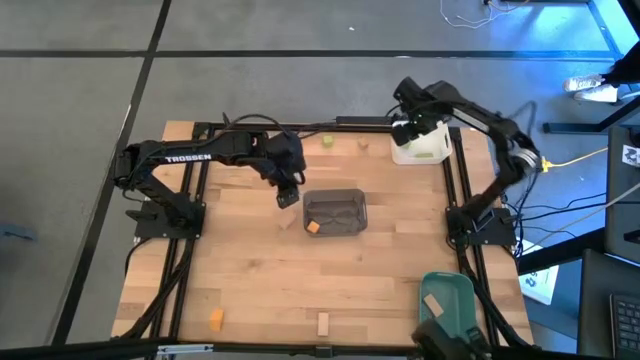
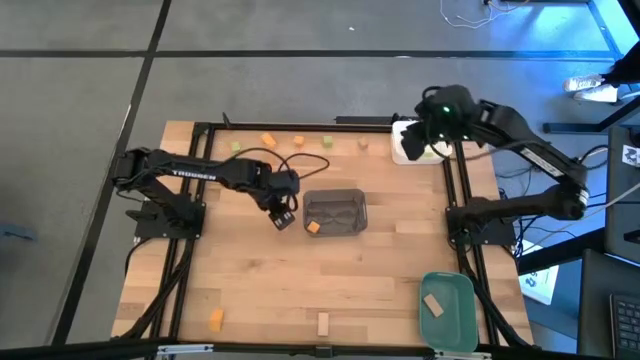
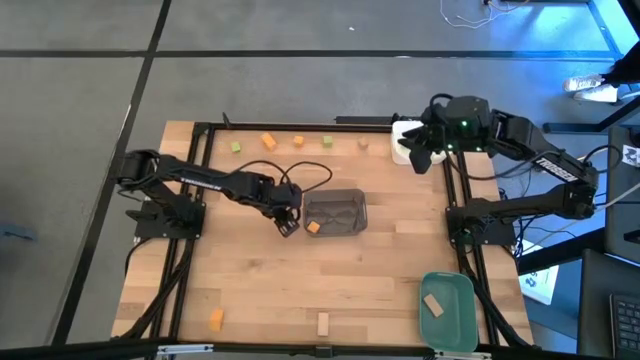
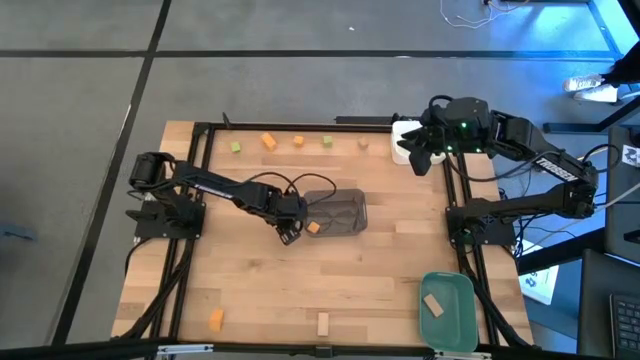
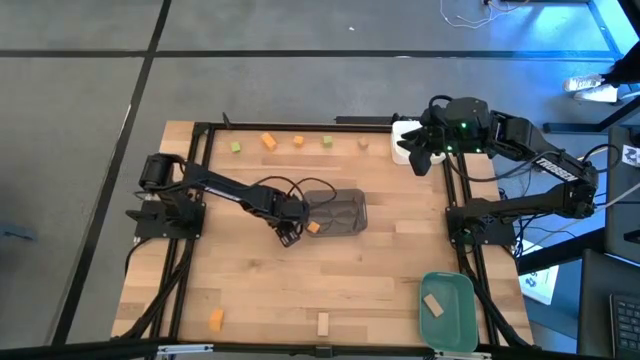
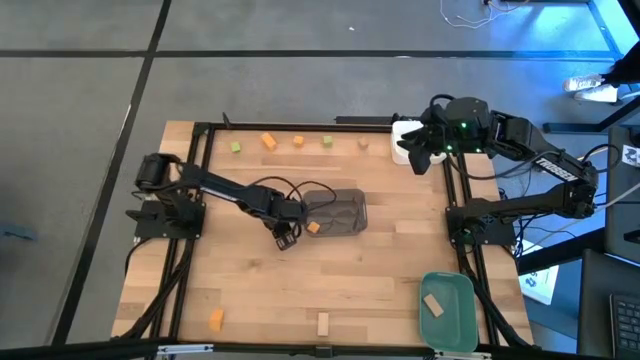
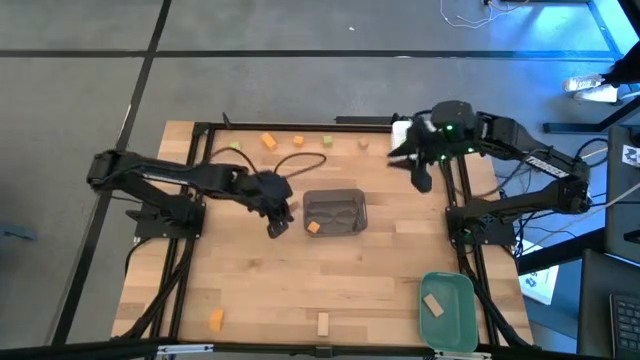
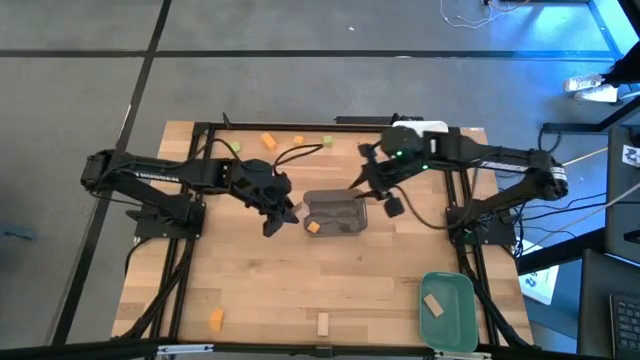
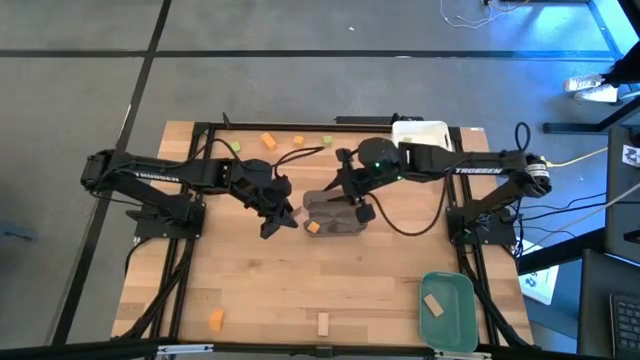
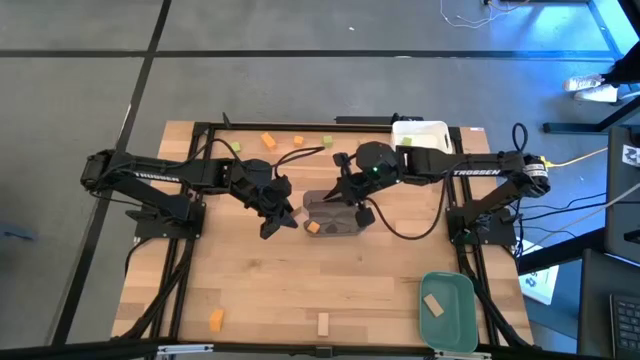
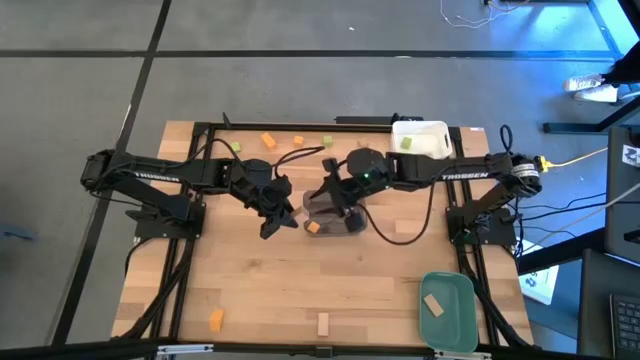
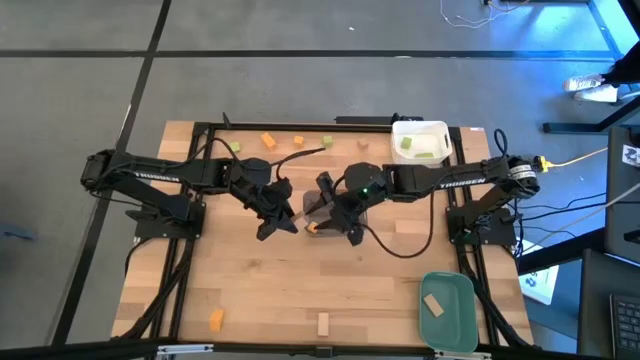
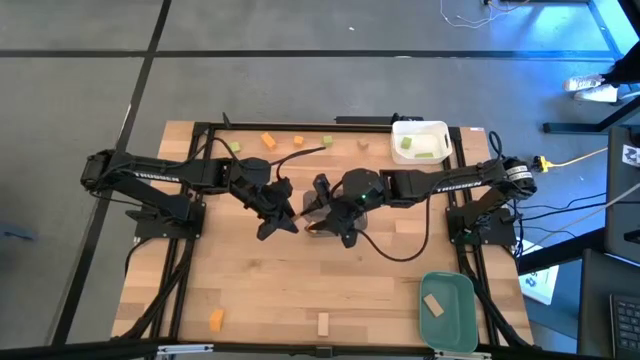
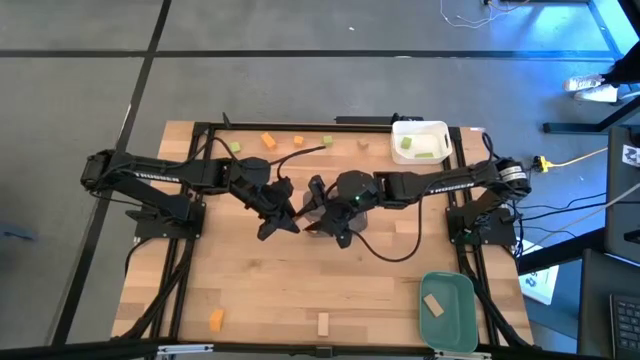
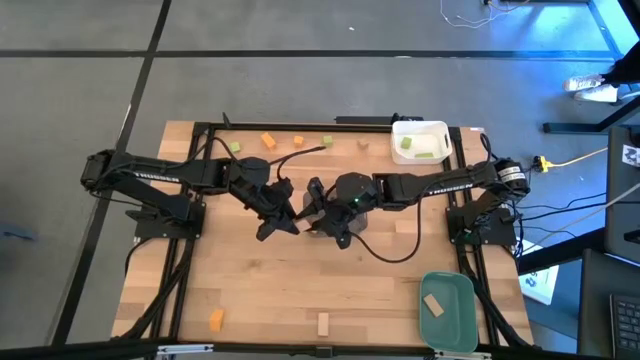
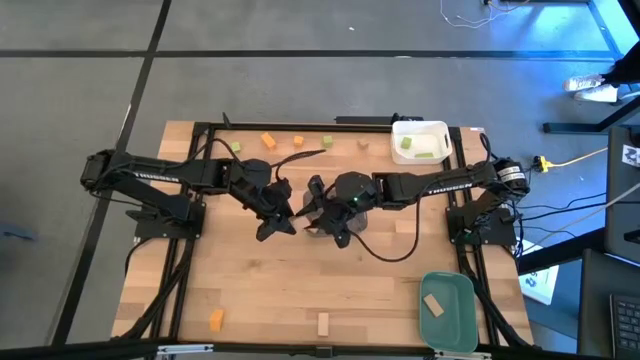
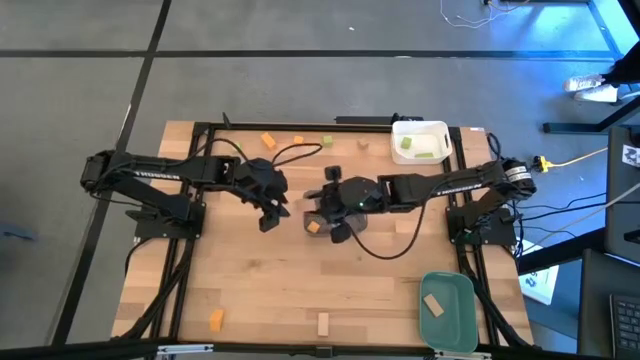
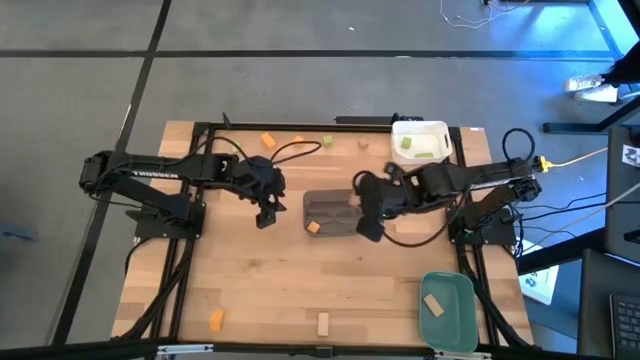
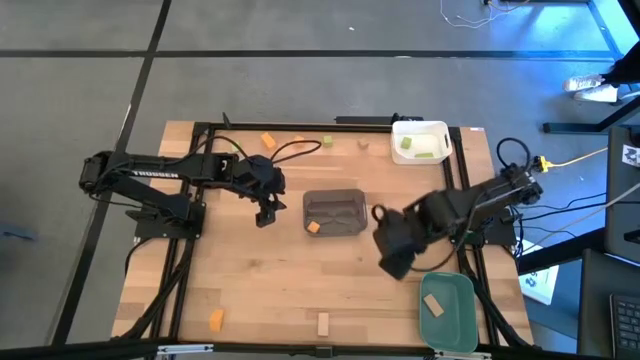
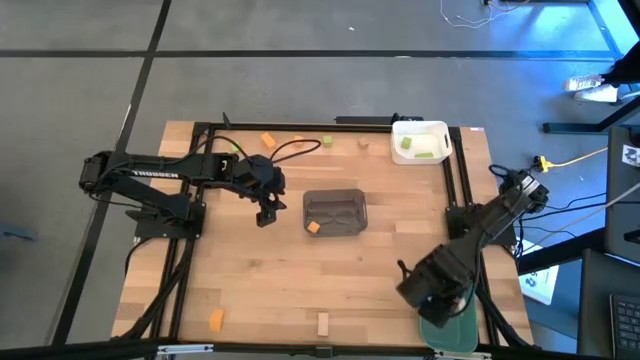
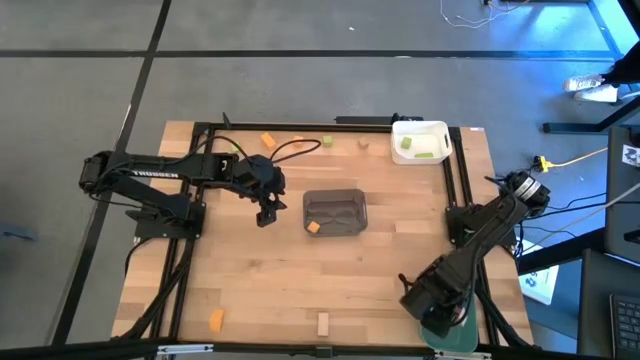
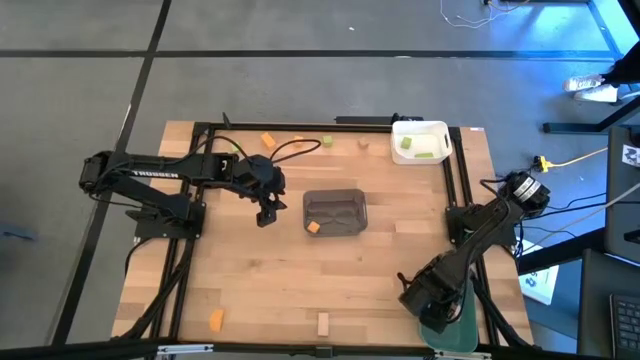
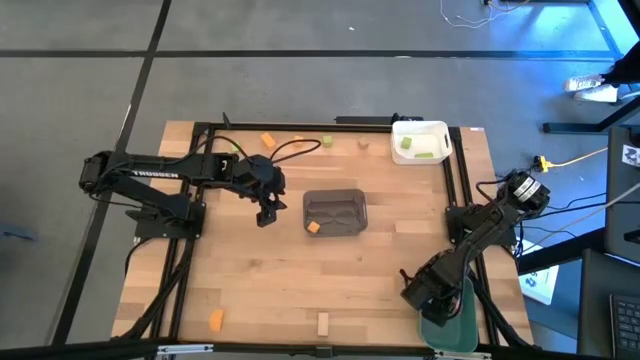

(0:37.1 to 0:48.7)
Task: Sort & place blocks by color
Put the brown block into the blue bin

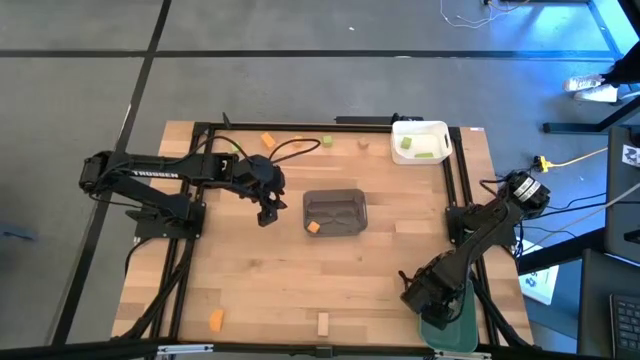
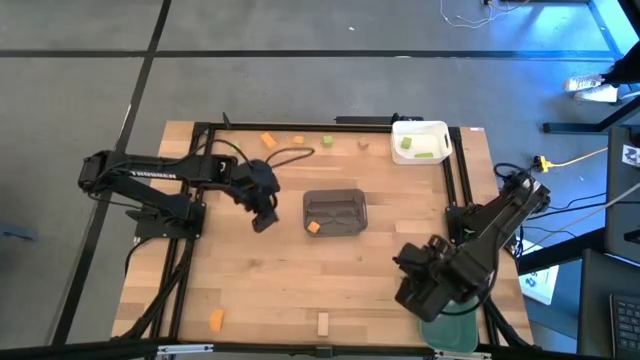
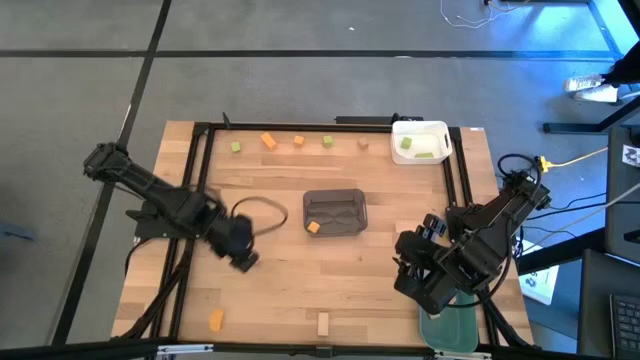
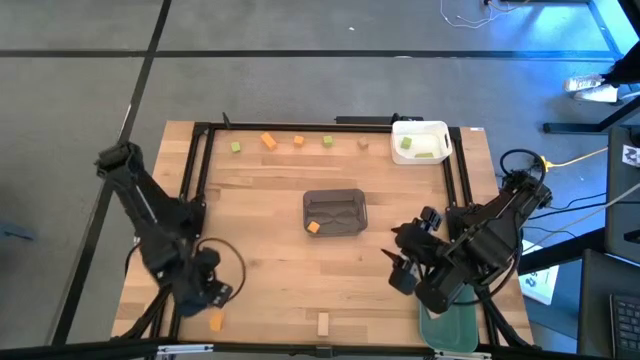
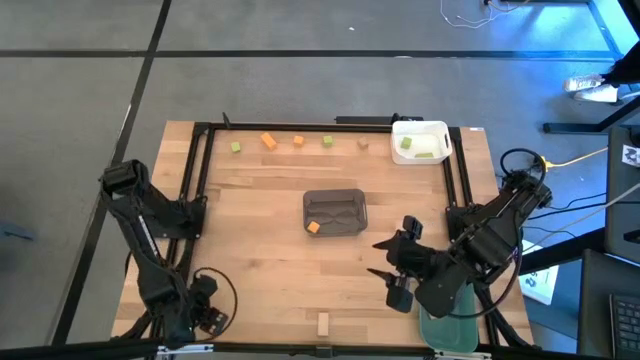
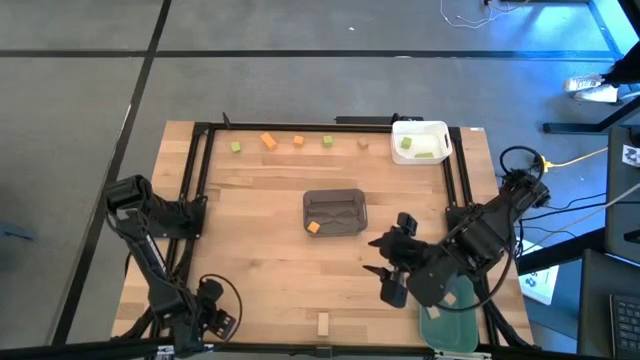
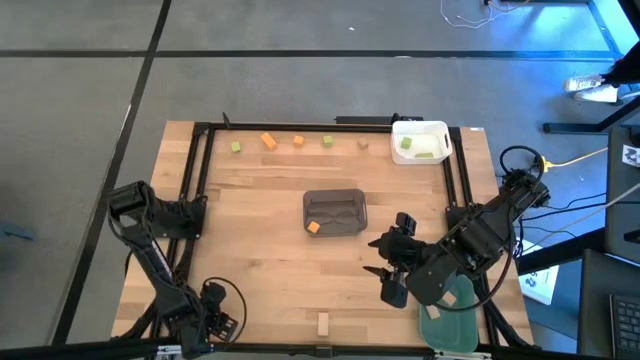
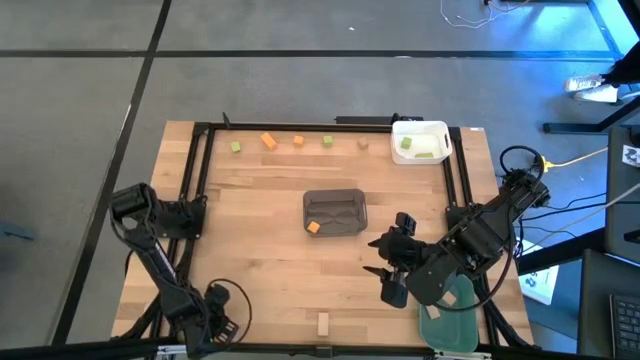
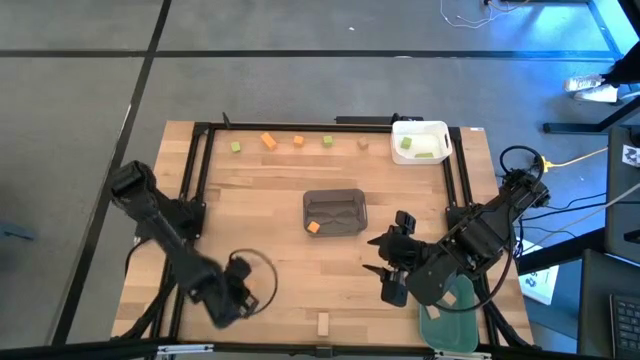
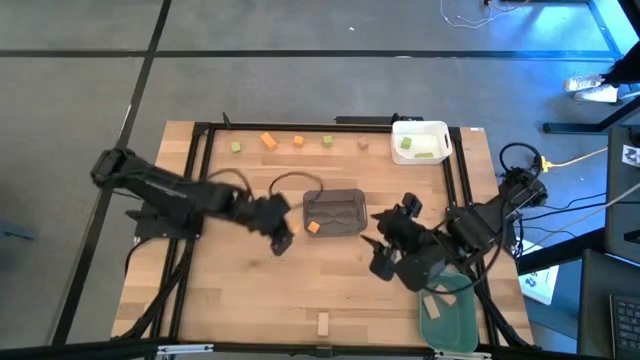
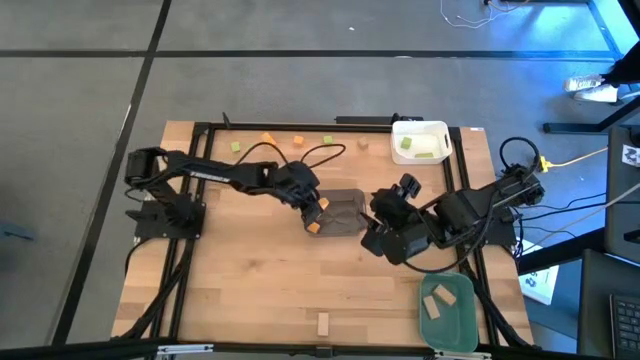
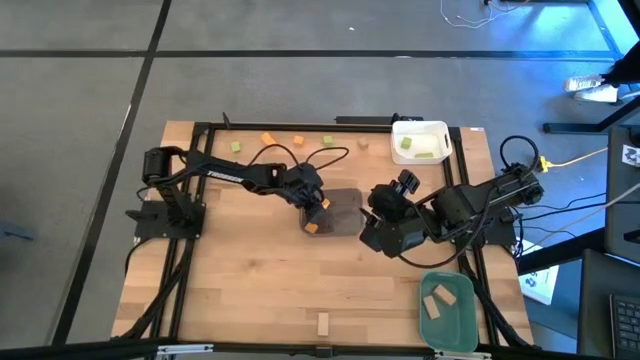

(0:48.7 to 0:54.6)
Put the orange block into the black bin

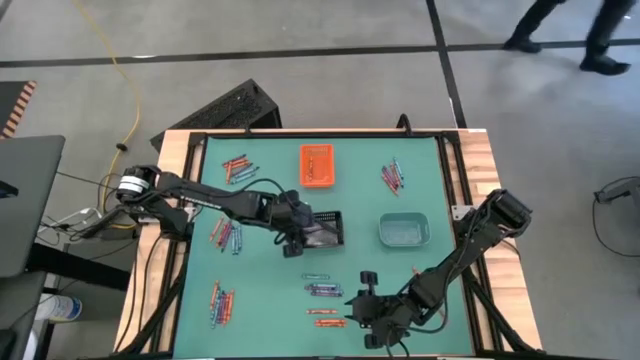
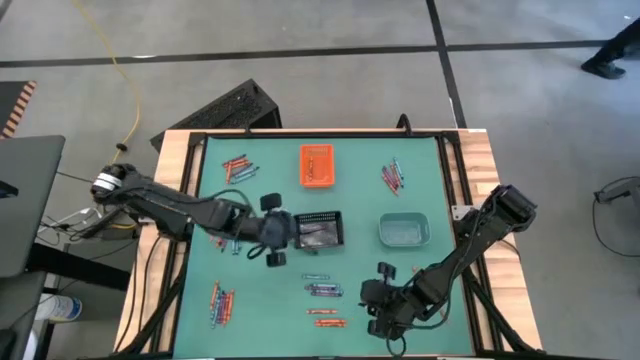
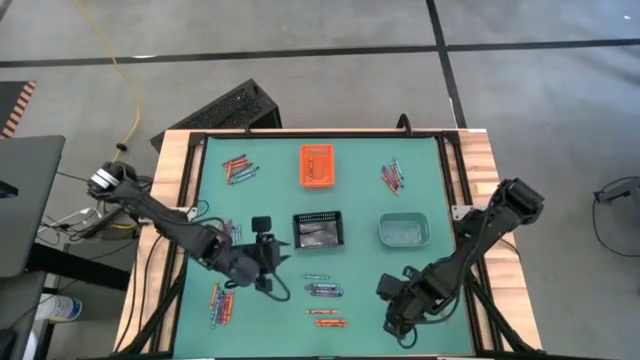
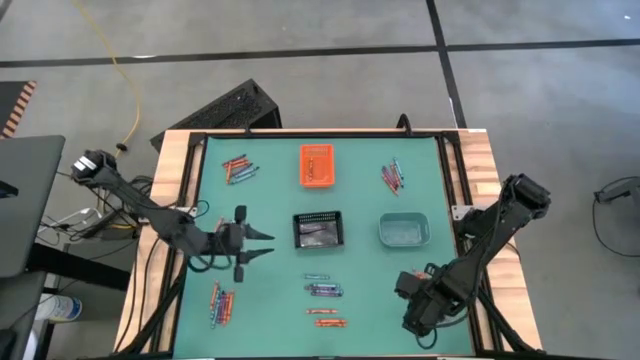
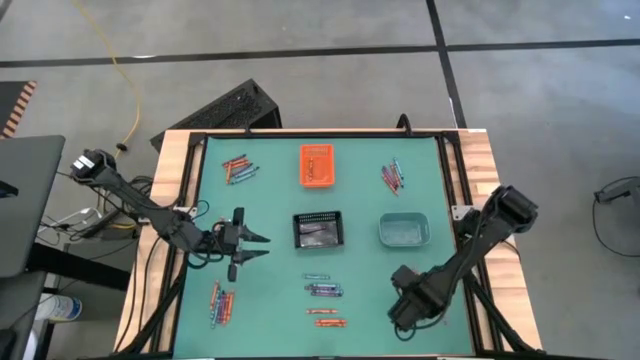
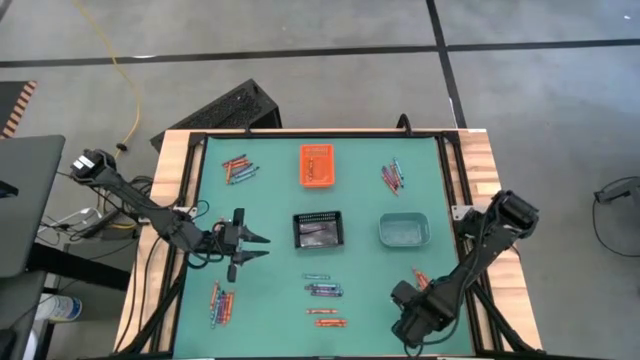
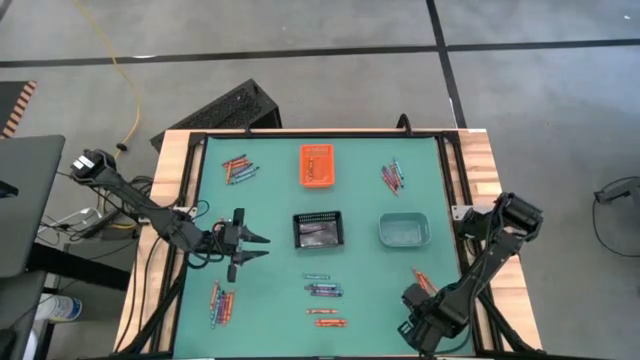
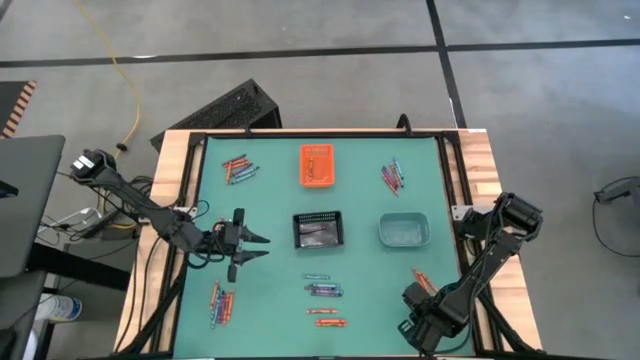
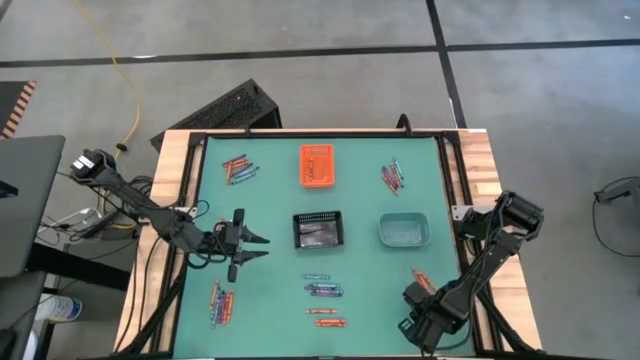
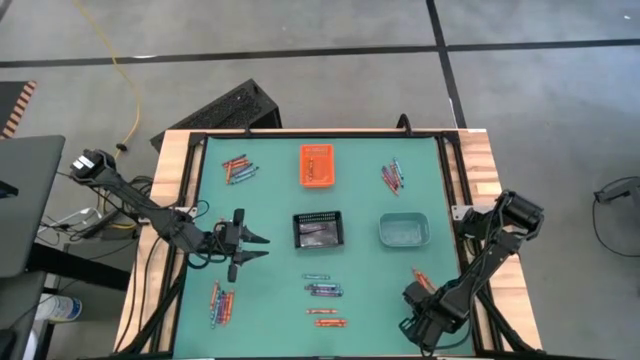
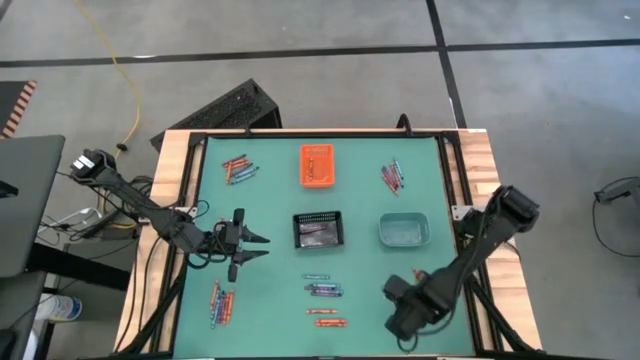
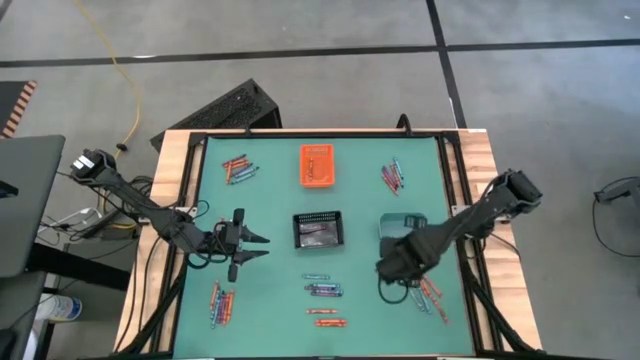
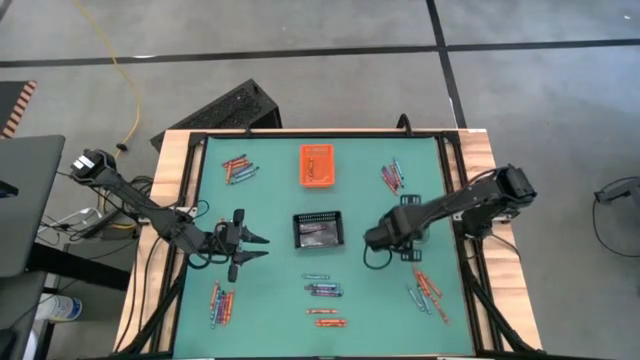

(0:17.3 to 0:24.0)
Task: Sort crayons
Put the blue crayon into the green bin
